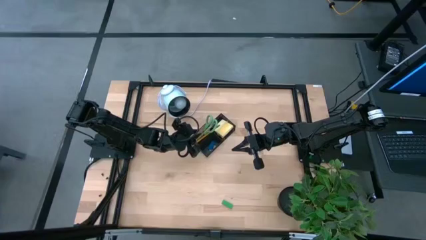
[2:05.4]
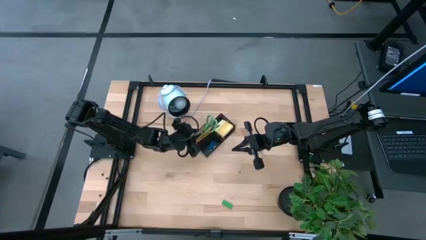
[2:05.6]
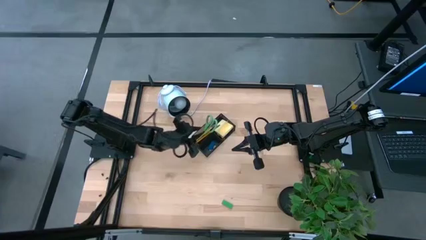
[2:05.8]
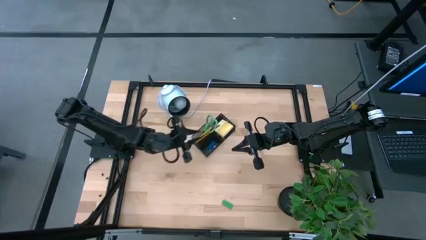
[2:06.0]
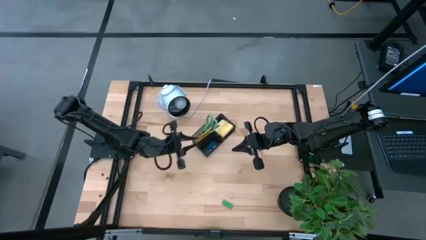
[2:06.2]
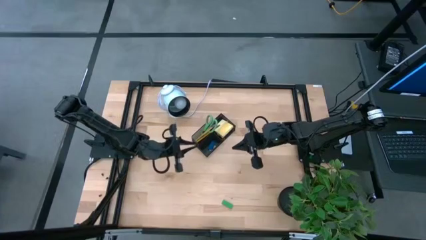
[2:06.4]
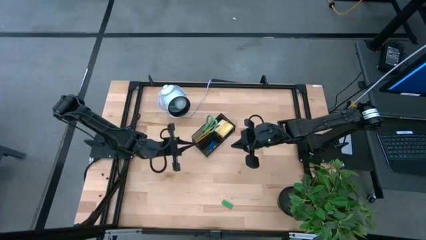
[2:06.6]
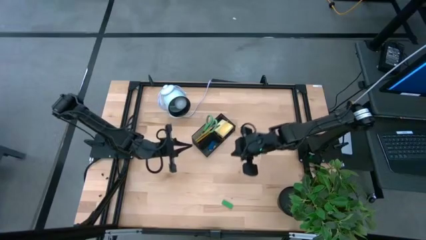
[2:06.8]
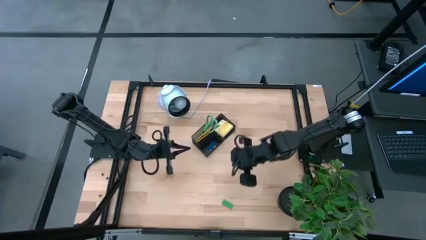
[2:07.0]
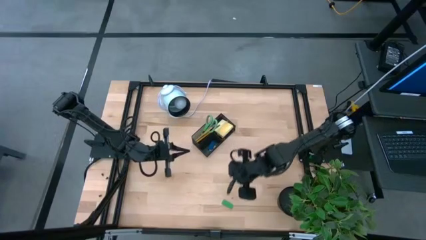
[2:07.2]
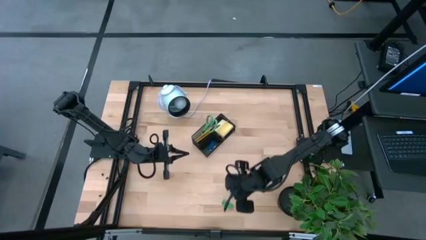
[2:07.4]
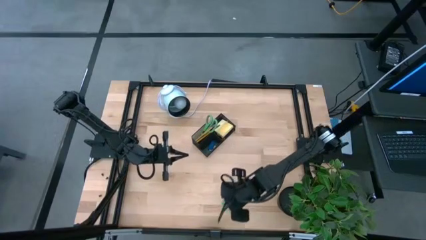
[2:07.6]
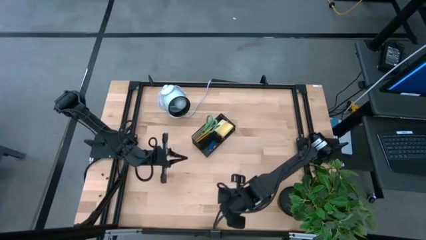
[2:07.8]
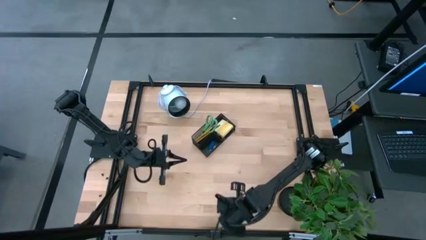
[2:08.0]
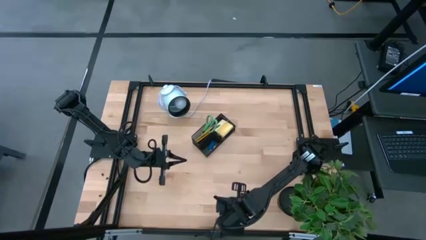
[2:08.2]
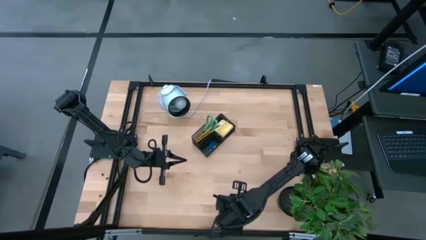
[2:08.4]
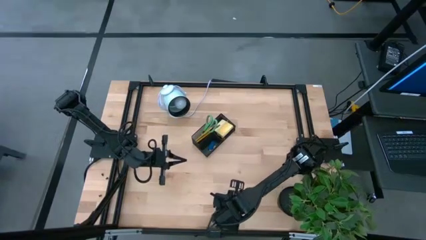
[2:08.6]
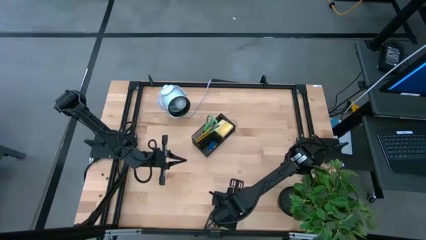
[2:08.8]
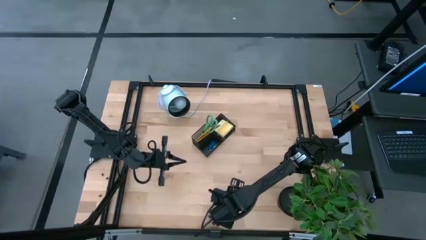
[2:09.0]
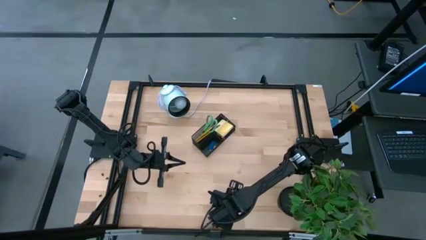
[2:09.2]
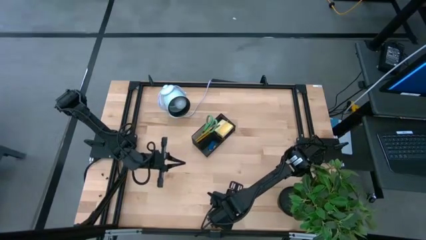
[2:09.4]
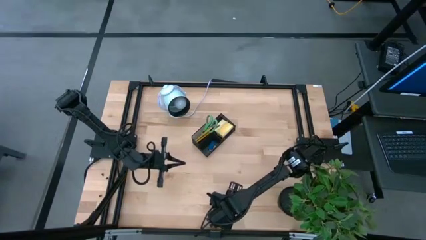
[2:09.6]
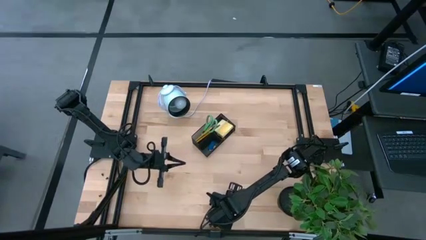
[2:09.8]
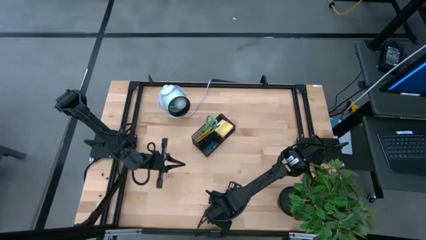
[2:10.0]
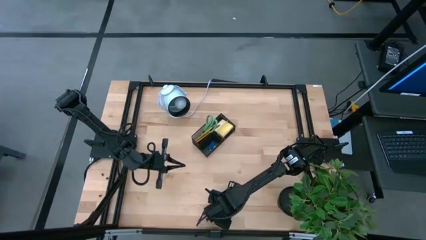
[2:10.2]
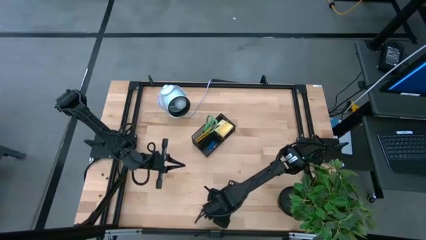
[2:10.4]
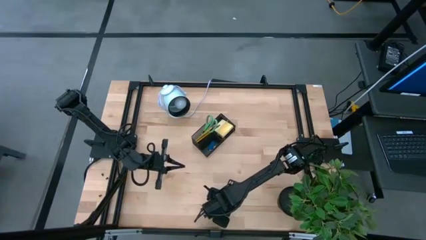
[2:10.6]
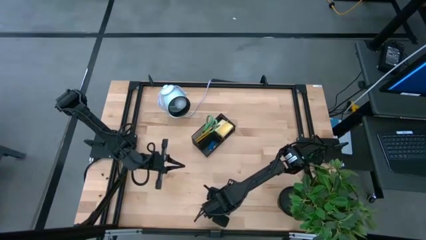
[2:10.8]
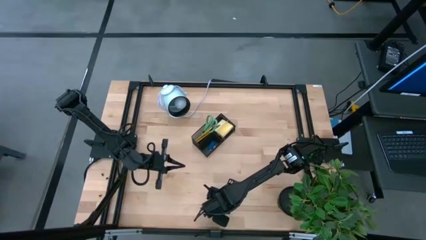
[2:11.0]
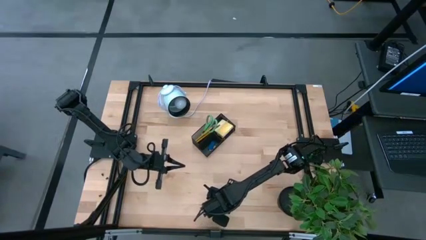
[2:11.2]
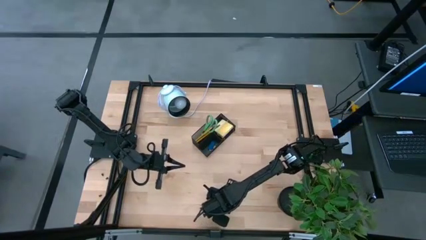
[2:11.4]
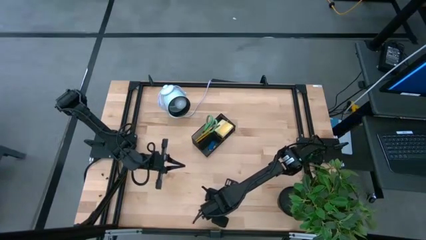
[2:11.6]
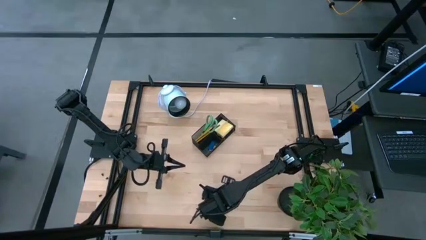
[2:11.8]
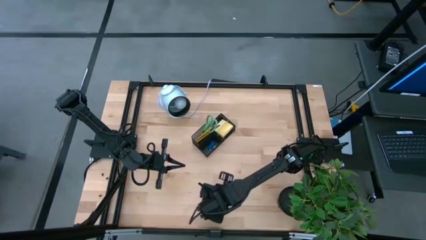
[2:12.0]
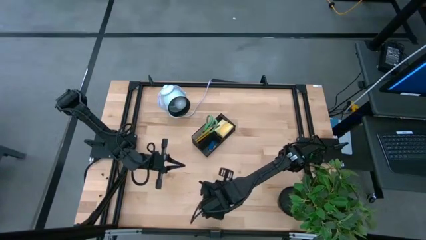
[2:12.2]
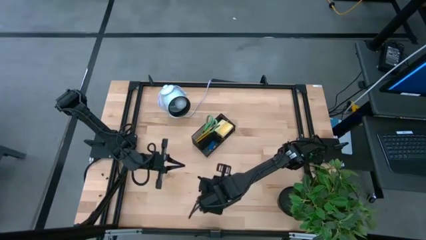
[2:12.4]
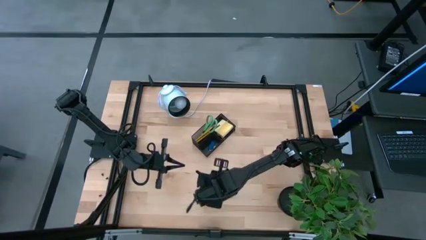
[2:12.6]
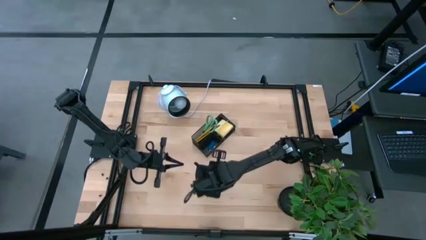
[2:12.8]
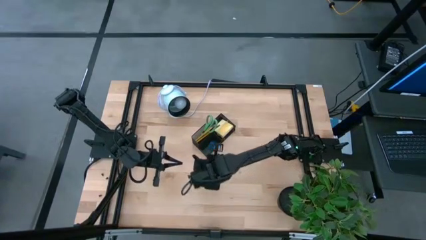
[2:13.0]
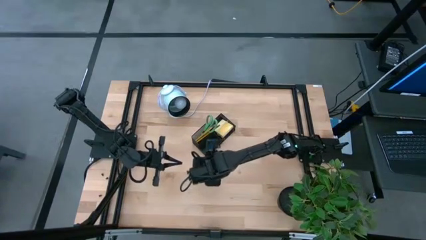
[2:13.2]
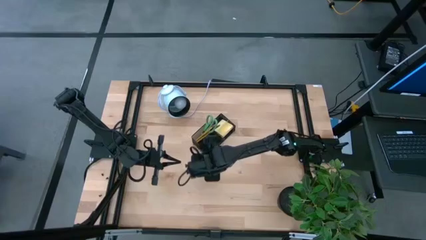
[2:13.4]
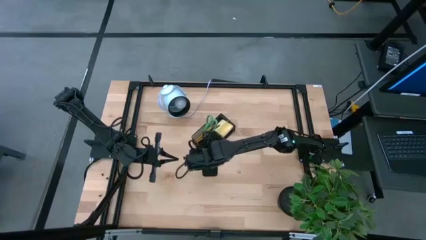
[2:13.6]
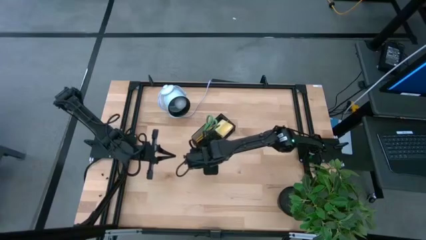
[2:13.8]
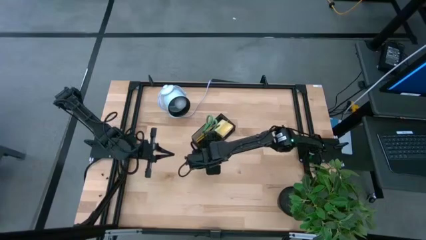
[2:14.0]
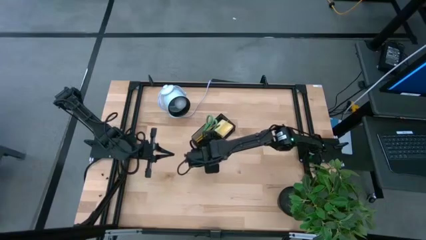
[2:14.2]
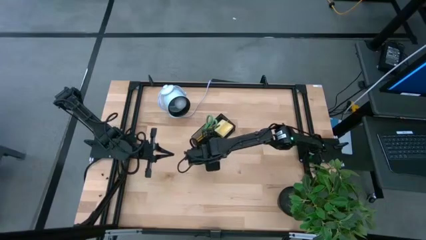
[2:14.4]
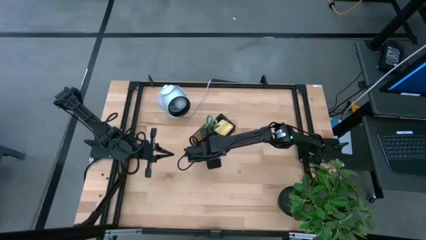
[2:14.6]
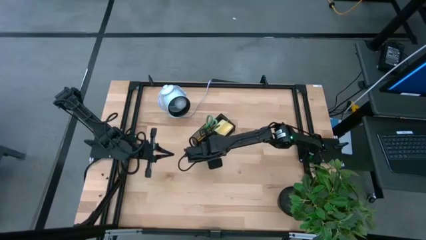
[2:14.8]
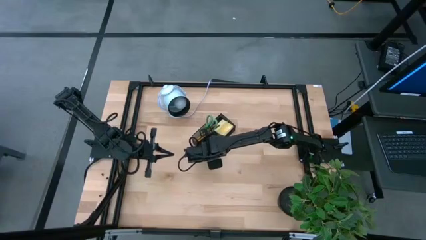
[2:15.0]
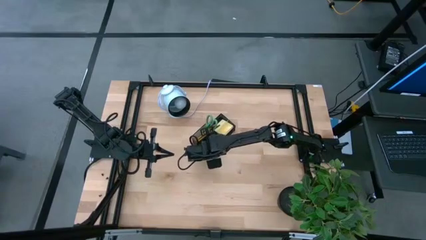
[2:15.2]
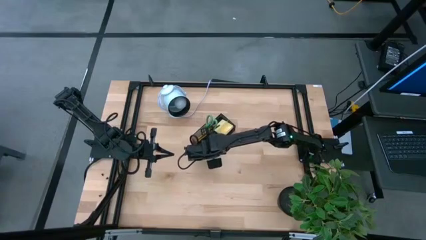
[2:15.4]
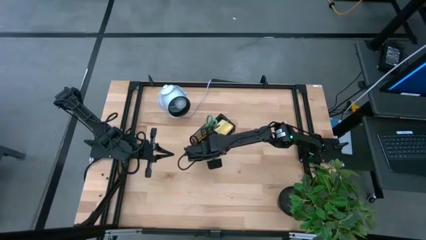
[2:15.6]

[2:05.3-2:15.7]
Task: Pick and place office supplies into organizer
Put the green eraser into the black desk organizer

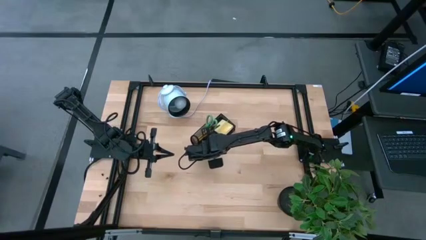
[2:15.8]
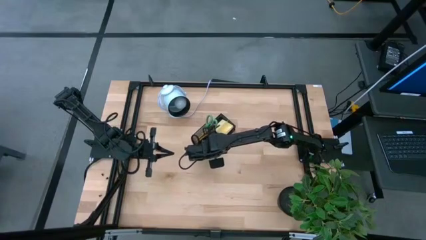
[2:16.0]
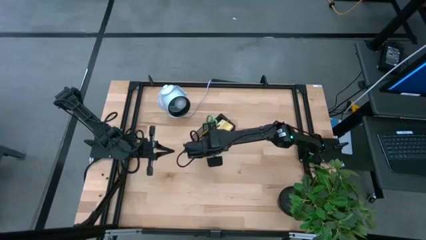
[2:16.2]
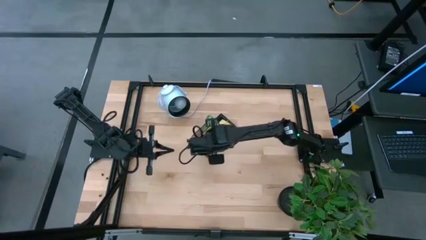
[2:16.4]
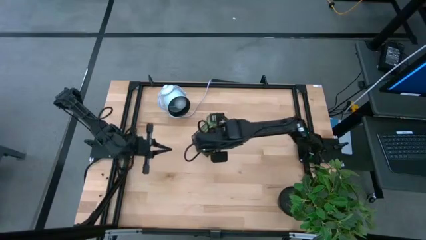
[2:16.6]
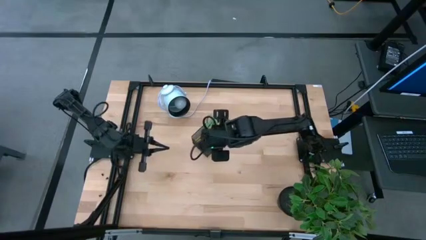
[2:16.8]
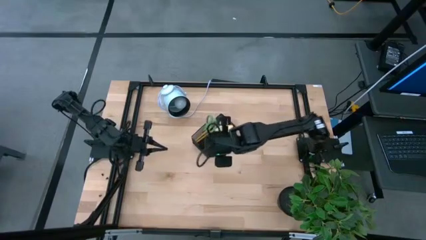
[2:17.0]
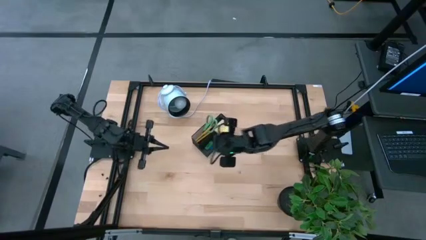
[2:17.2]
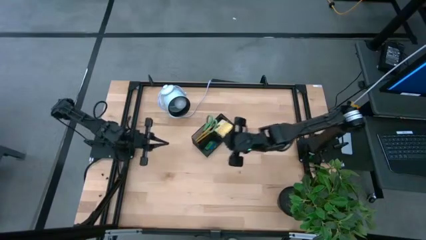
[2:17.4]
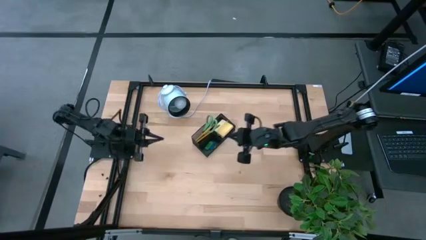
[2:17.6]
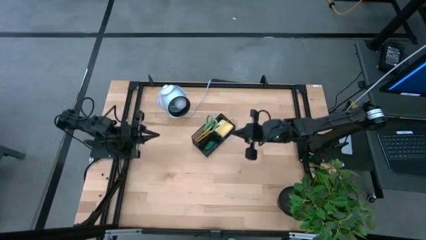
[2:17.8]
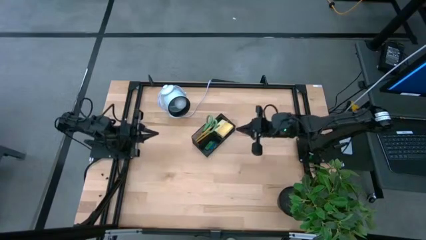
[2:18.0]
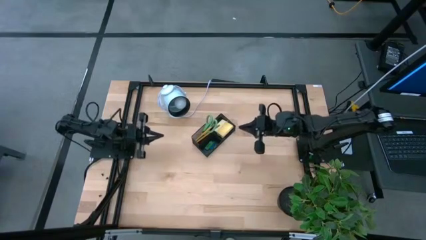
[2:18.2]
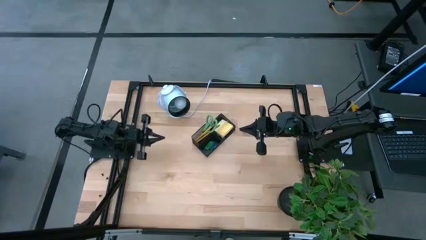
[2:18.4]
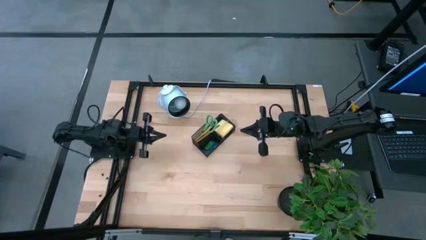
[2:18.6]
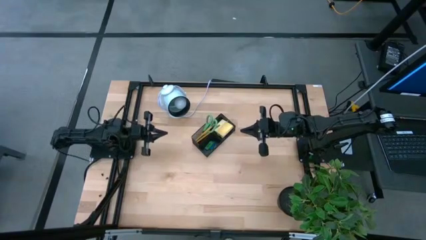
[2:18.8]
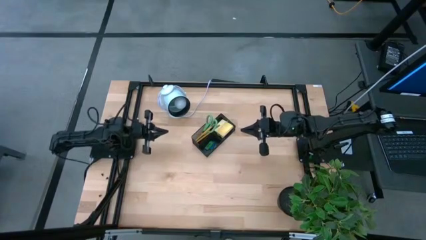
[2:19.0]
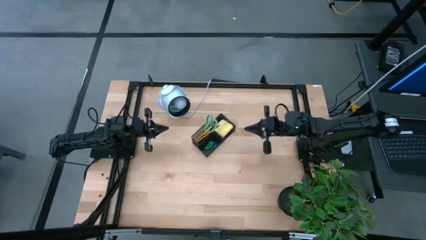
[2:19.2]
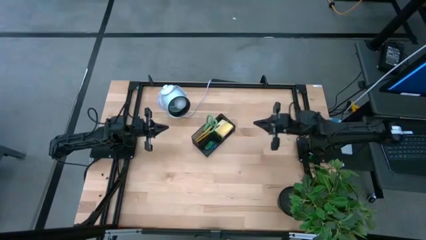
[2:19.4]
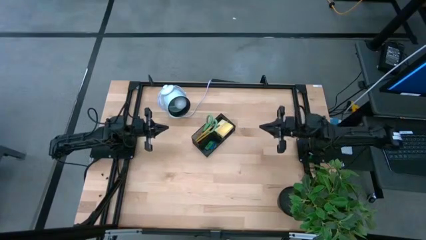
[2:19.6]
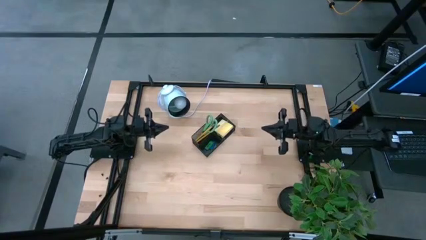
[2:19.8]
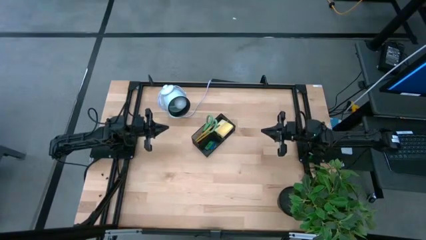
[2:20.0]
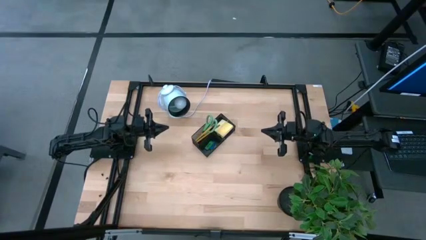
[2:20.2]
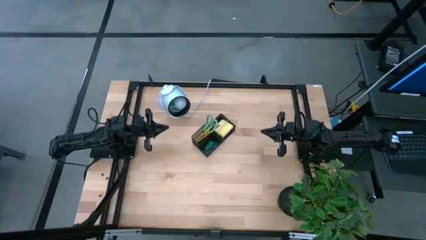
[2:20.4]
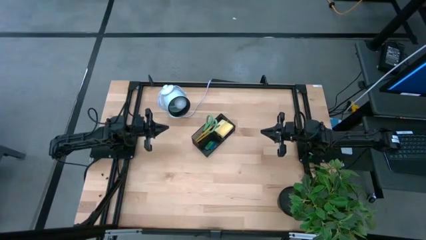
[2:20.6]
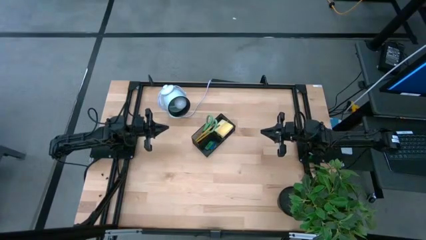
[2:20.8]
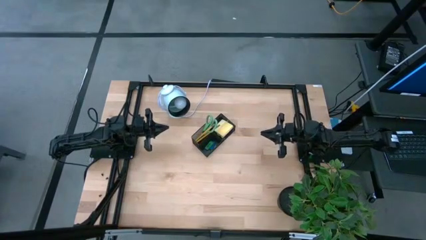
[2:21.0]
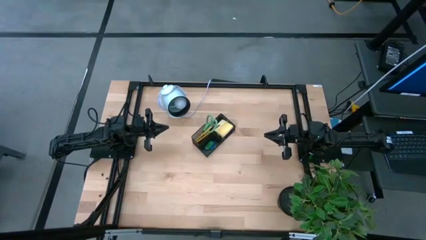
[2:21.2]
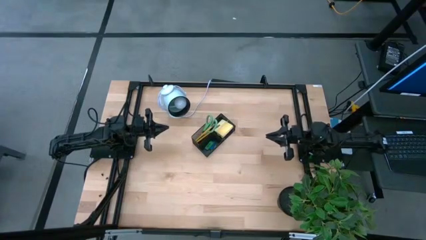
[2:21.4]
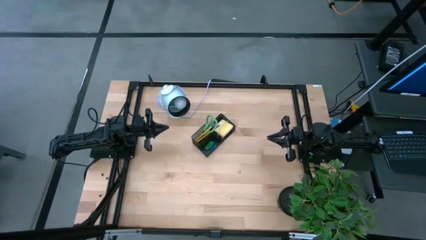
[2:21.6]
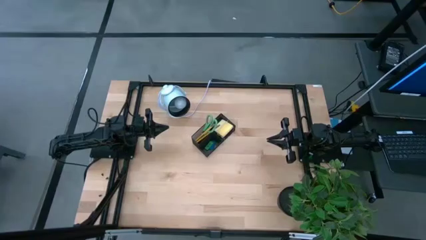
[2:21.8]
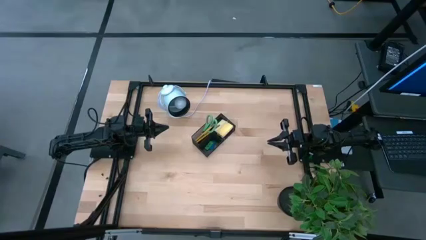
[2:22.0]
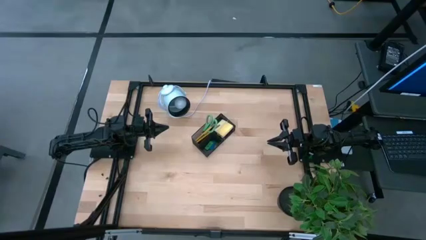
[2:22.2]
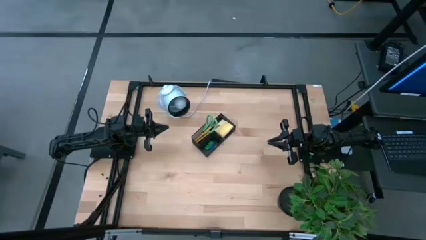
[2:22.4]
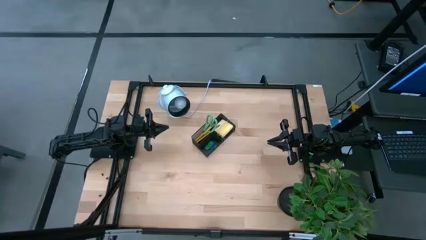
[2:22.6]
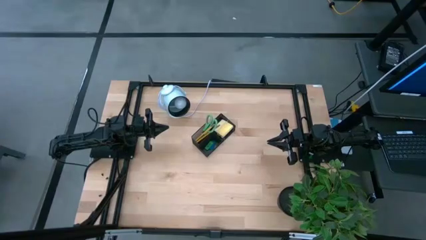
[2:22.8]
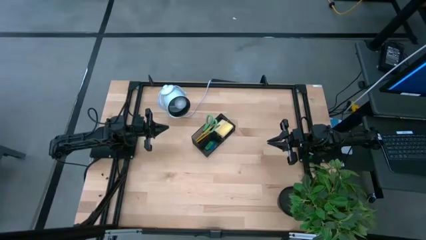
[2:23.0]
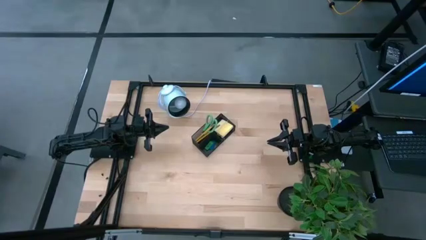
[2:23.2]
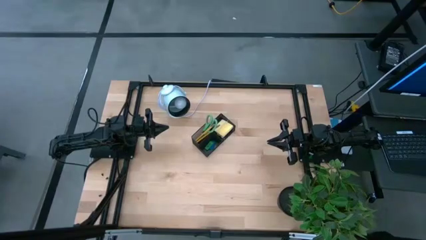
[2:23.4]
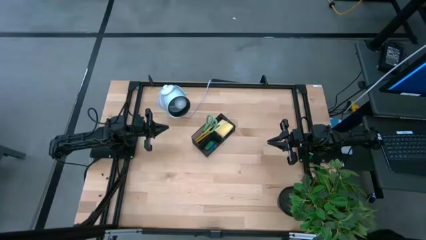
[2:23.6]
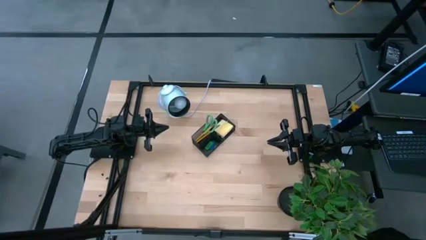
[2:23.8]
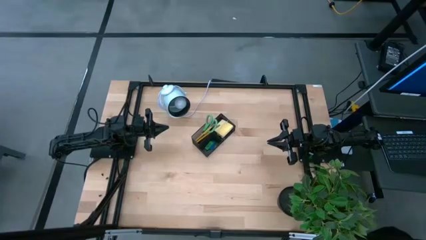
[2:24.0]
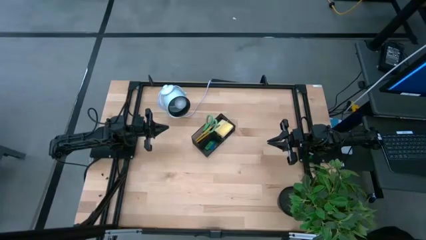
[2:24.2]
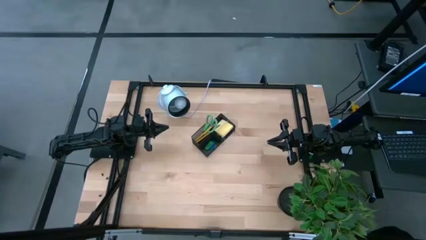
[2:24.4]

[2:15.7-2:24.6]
Return to Home Position
